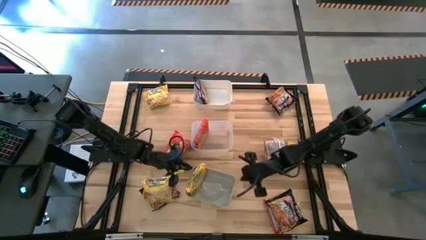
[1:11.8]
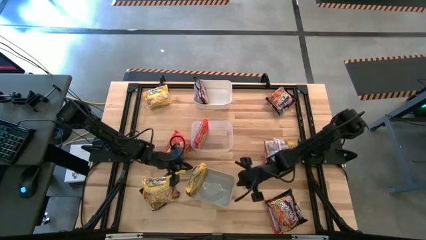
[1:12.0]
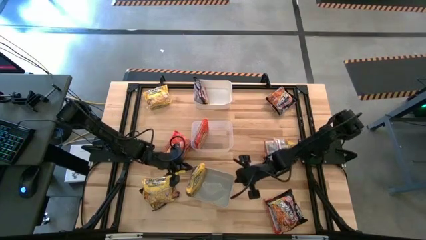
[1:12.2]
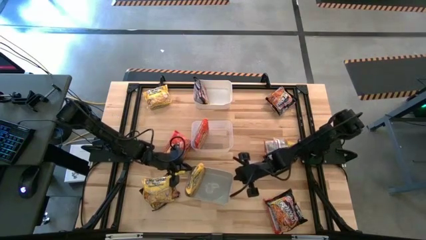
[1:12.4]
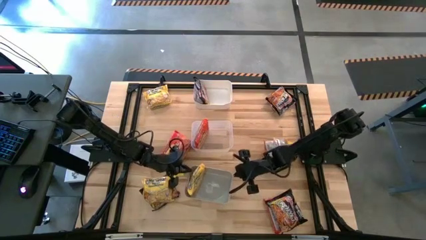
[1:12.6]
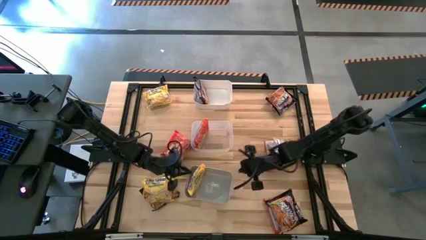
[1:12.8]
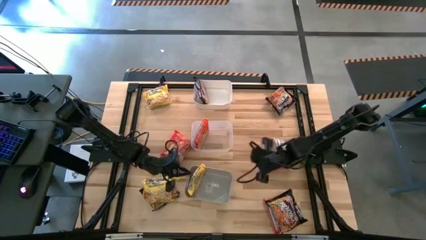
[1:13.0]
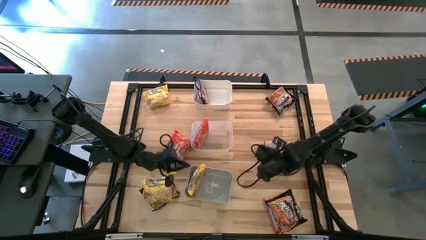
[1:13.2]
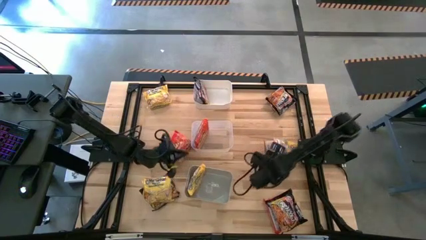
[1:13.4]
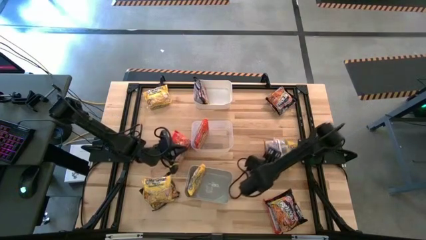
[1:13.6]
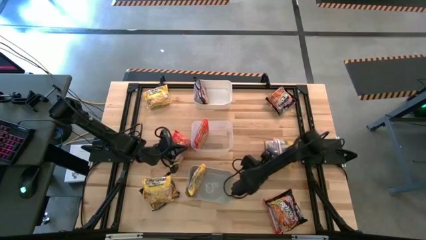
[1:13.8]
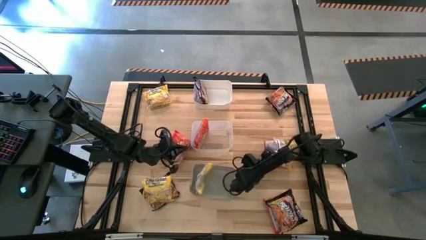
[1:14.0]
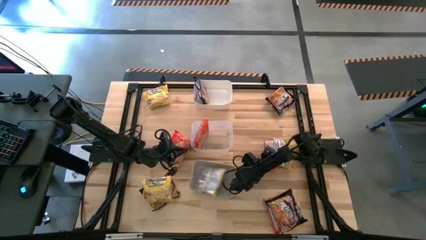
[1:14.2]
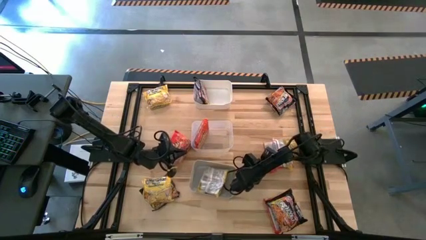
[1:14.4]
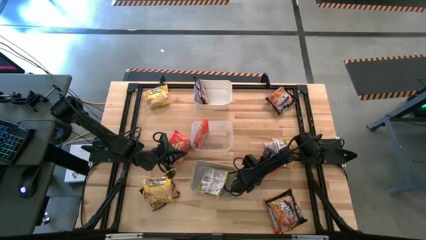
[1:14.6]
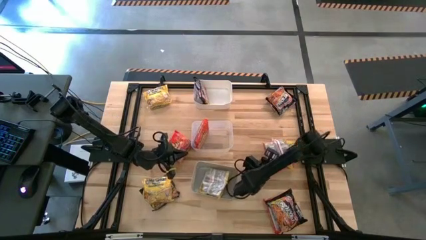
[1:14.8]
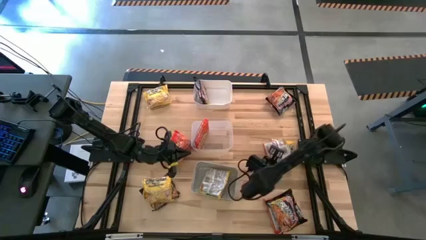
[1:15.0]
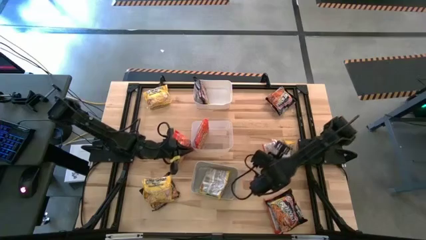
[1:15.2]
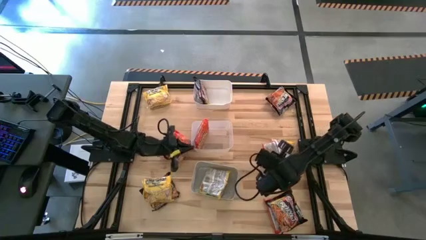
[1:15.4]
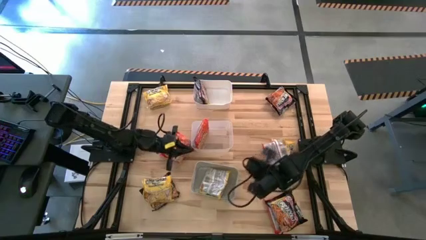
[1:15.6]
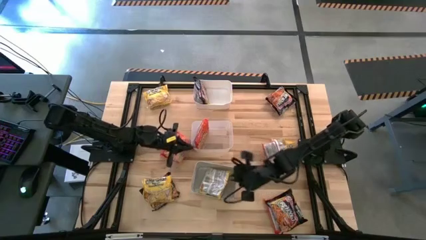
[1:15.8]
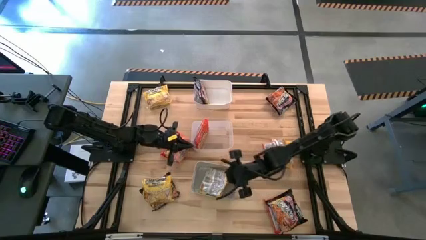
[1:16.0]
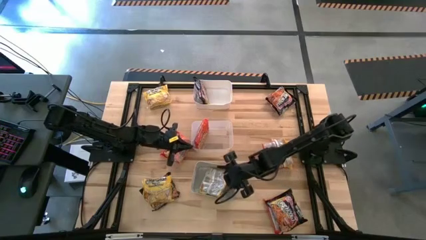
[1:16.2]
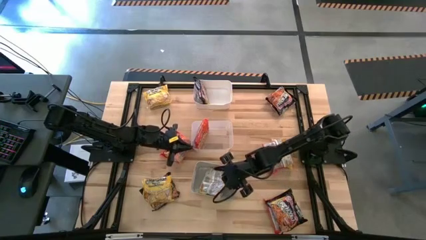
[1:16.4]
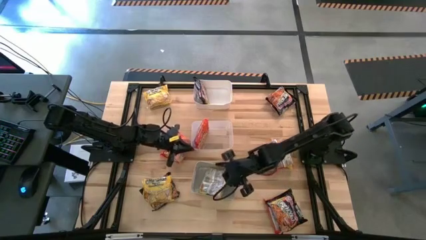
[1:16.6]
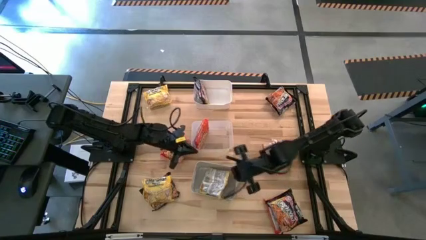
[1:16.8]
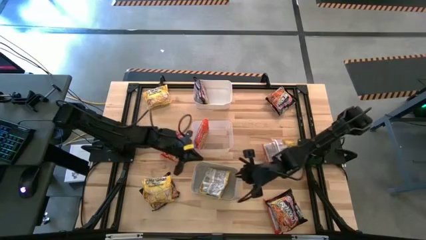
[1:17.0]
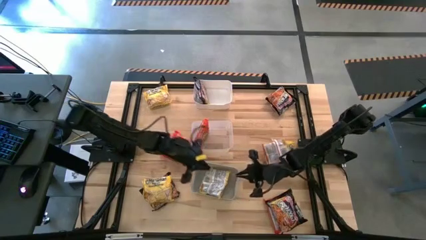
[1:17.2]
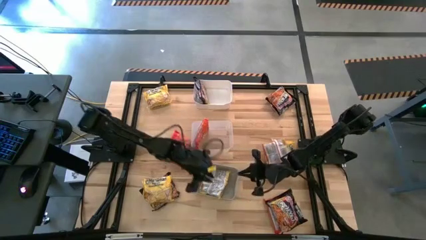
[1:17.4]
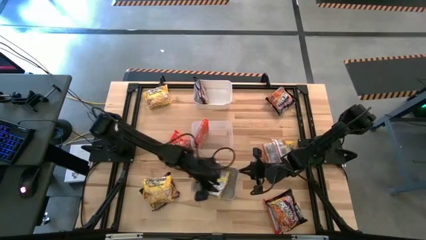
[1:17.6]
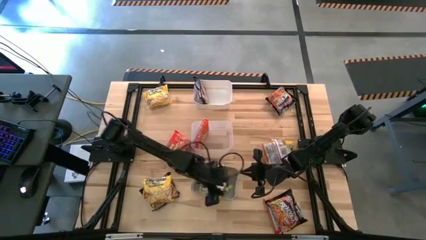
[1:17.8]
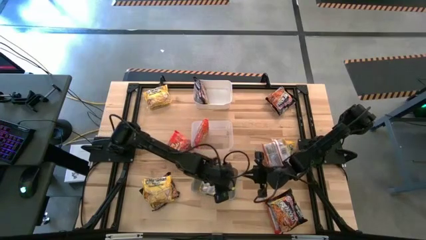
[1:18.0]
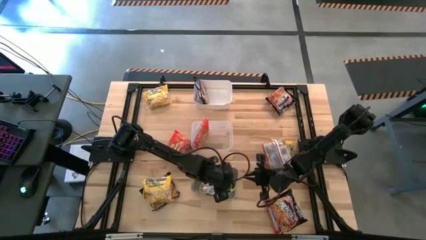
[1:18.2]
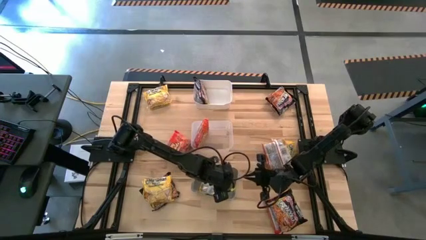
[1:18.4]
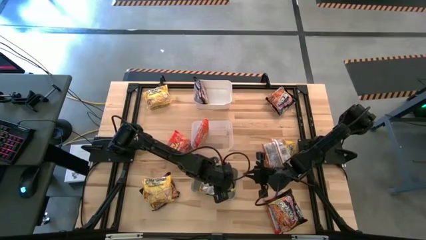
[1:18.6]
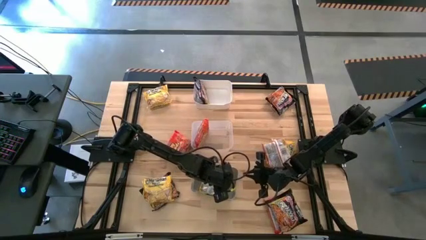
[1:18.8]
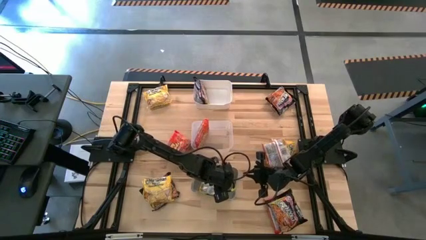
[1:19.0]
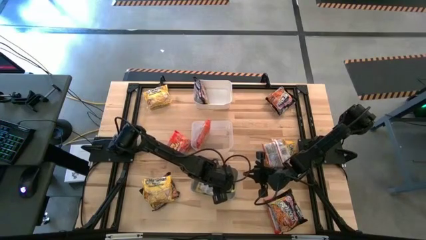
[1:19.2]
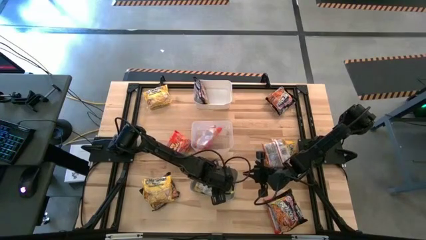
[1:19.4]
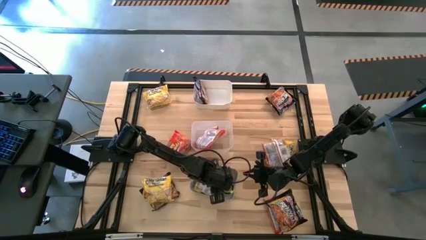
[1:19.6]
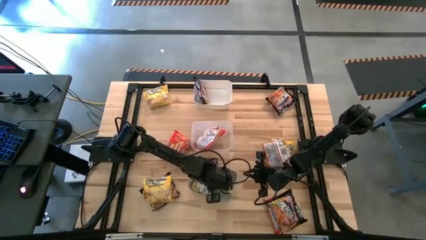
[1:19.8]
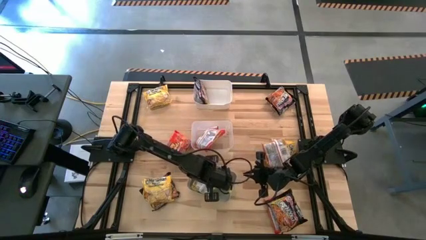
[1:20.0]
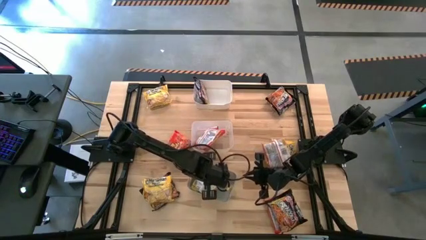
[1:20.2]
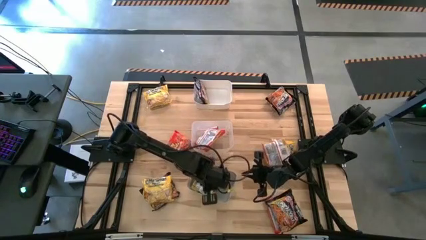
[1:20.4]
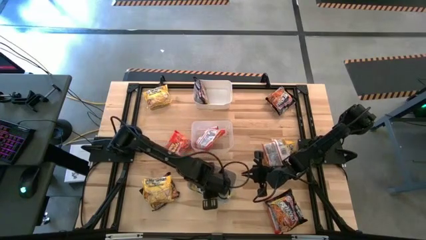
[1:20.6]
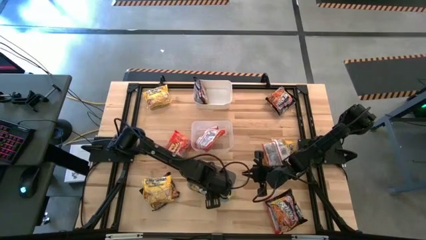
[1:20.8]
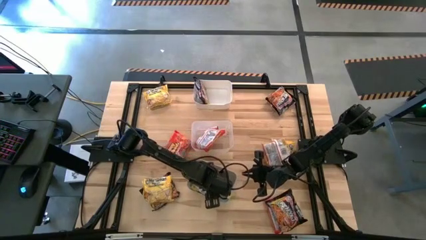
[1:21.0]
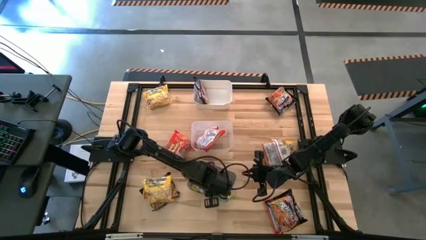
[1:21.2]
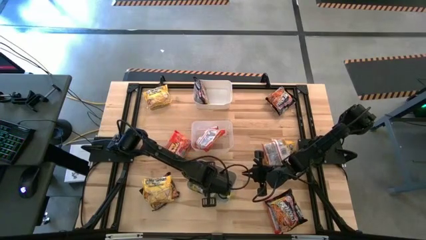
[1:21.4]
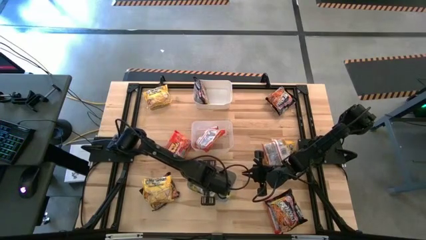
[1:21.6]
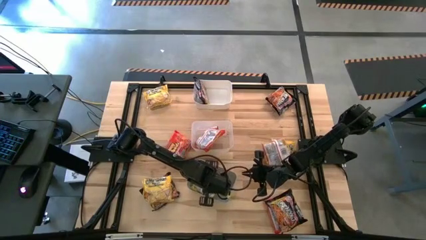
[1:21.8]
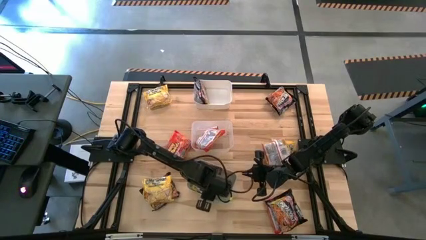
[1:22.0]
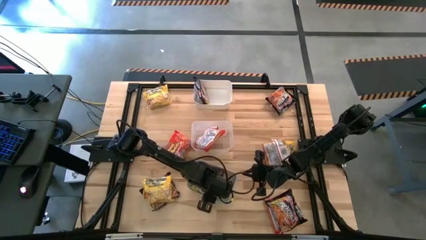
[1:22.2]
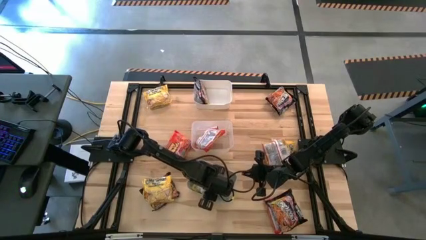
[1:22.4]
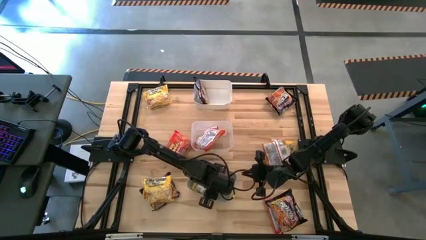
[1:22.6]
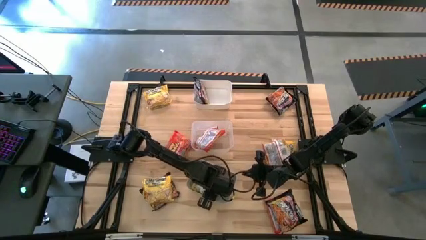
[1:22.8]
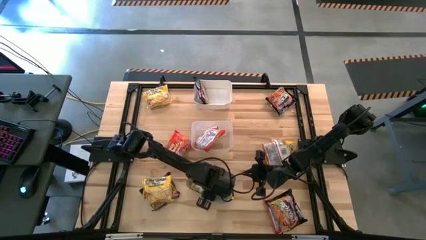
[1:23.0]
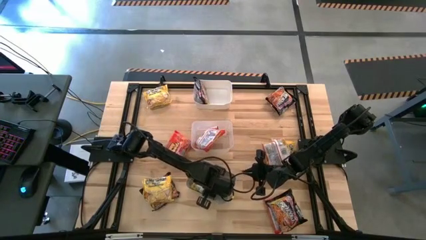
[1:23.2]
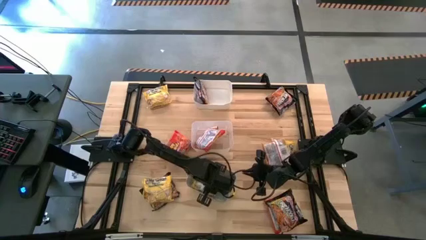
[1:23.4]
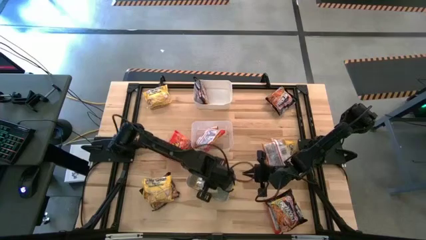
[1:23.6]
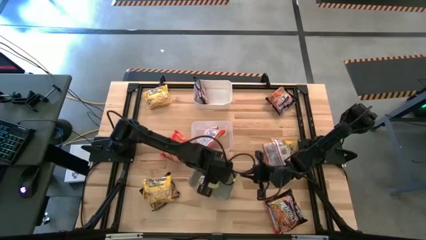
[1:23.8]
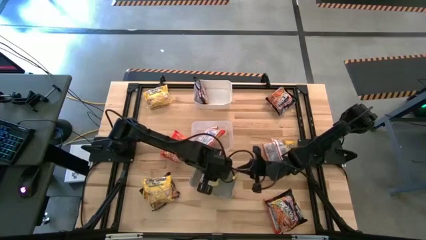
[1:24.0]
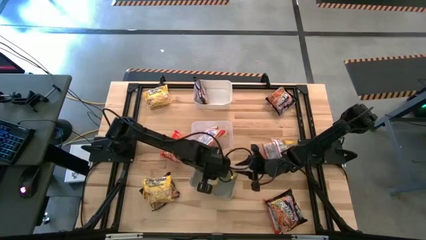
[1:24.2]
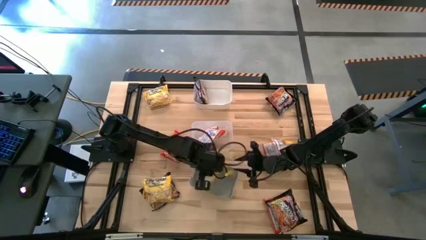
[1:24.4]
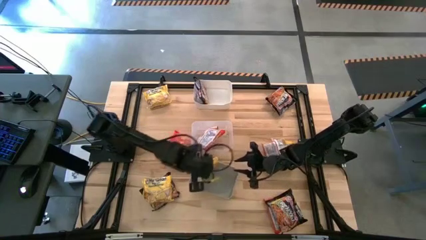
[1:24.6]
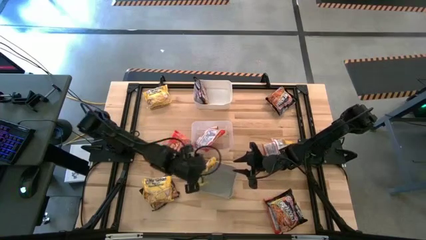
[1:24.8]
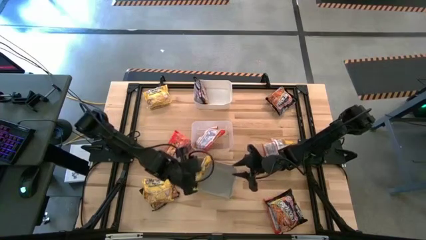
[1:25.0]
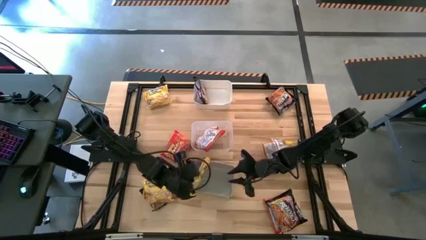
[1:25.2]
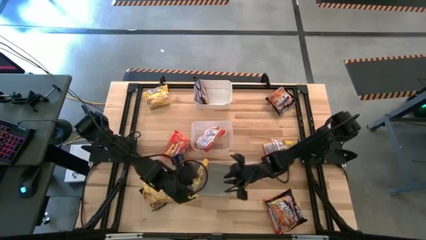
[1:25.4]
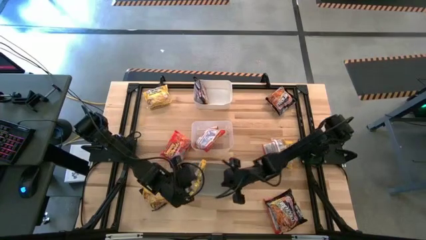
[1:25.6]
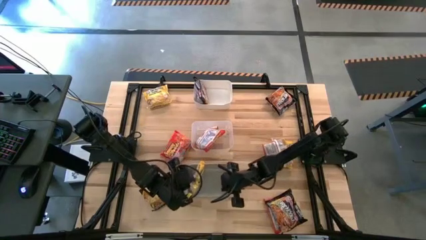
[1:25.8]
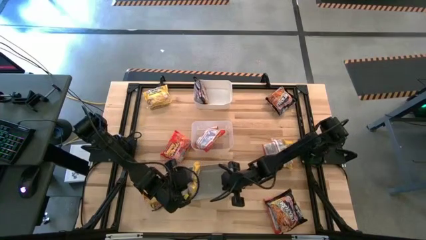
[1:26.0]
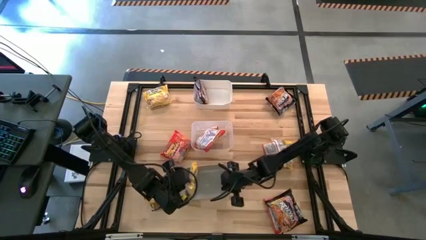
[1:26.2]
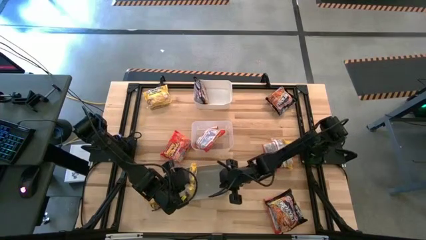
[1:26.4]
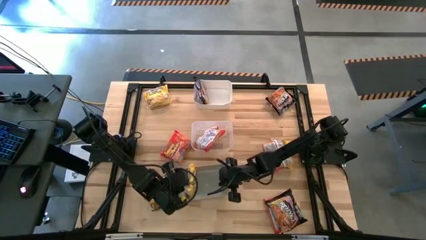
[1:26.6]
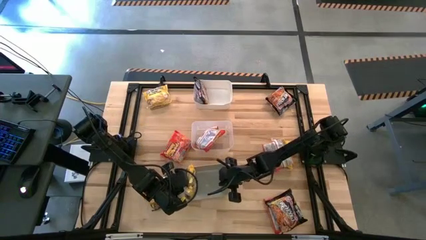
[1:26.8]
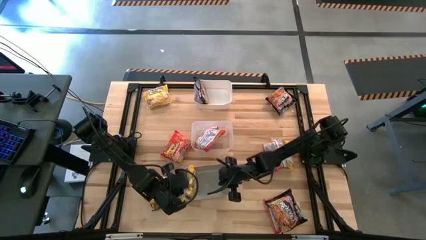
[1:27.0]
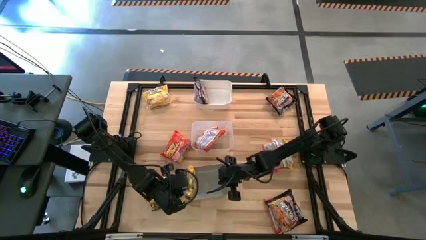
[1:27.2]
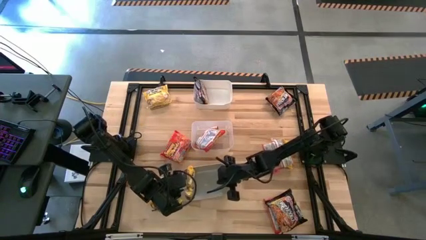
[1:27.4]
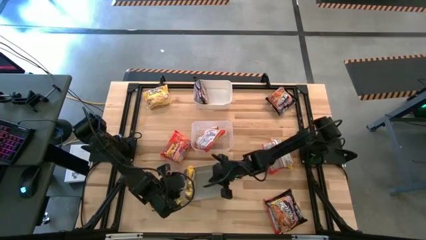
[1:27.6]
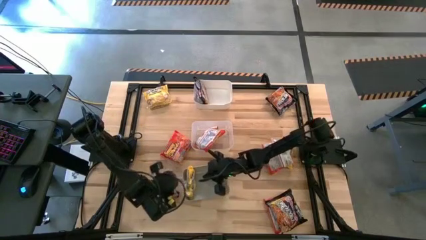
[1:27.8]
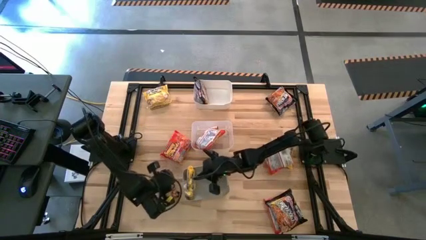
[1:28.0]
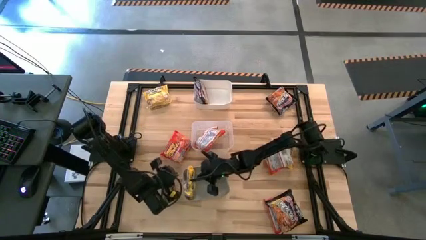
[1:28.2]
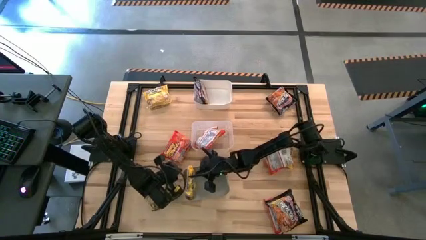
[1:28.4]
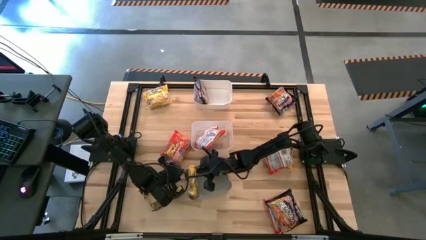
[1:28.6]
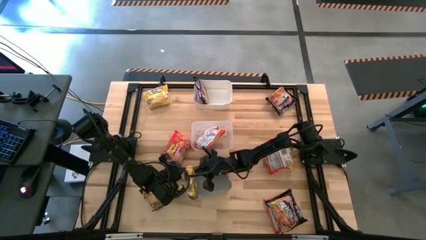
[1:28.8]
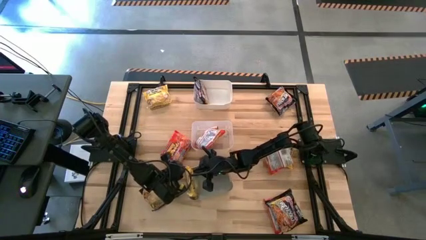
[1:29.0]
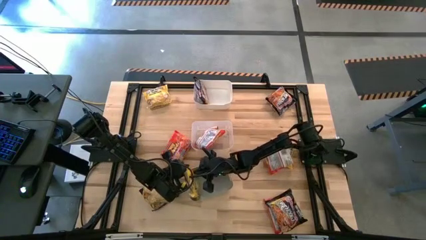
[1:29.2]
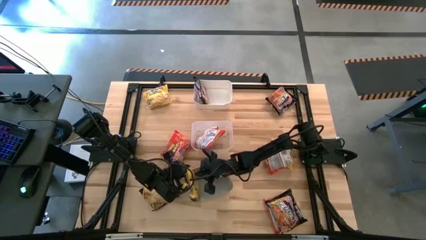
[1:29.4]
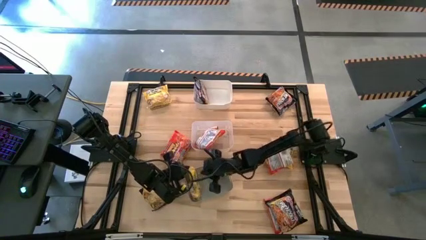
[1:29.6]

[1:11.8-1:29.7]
Task: Sort Maruchan noodles
Put the yellow noodle pack into the gray bin
